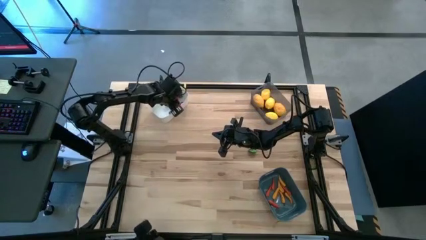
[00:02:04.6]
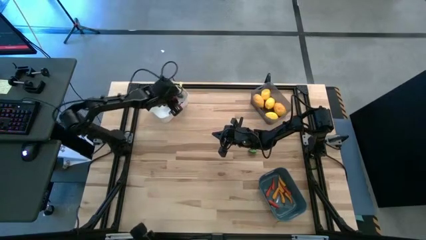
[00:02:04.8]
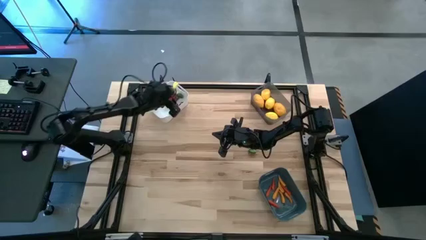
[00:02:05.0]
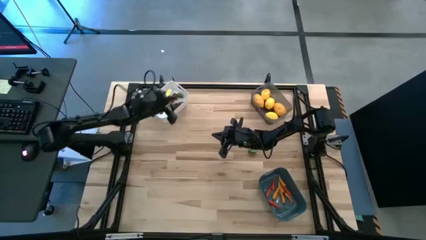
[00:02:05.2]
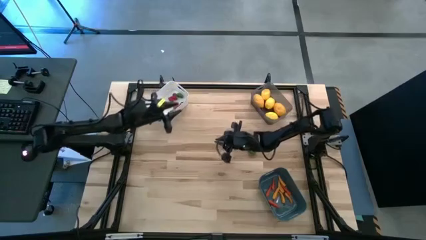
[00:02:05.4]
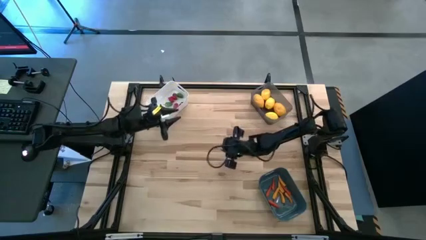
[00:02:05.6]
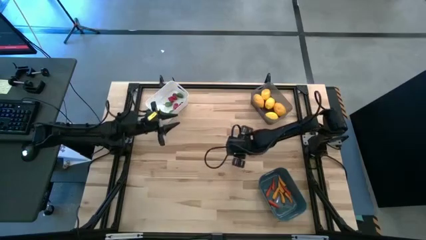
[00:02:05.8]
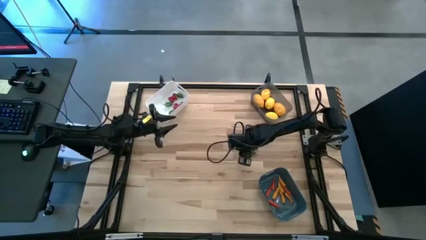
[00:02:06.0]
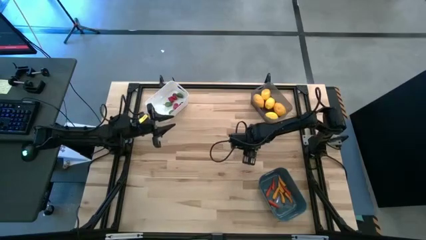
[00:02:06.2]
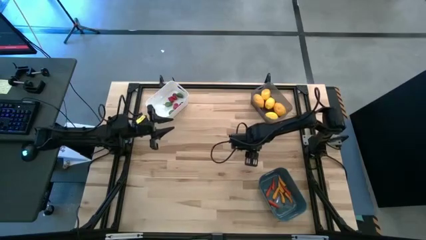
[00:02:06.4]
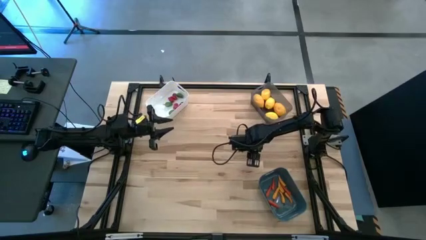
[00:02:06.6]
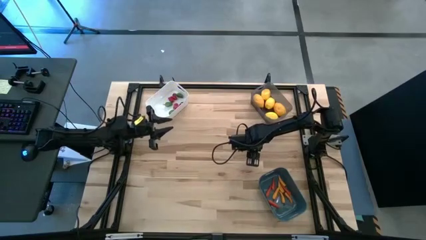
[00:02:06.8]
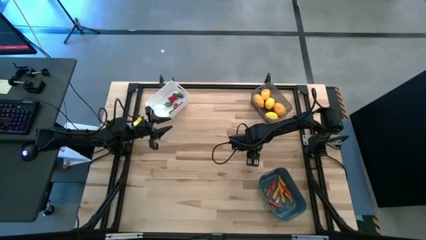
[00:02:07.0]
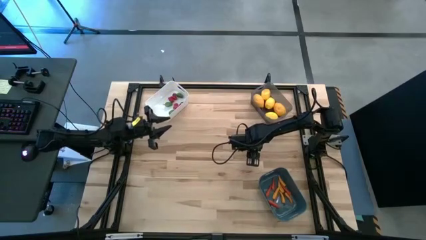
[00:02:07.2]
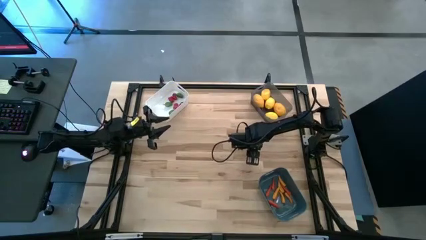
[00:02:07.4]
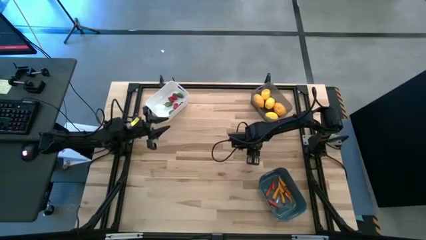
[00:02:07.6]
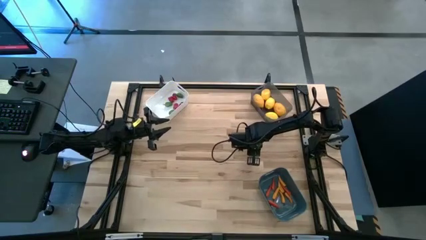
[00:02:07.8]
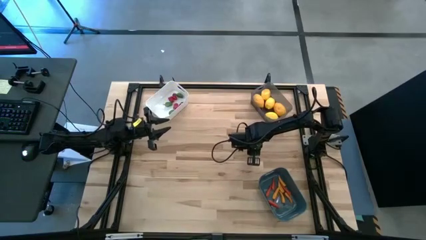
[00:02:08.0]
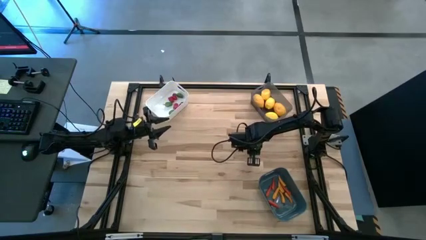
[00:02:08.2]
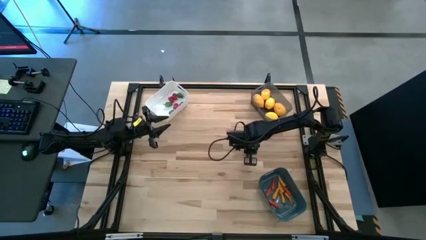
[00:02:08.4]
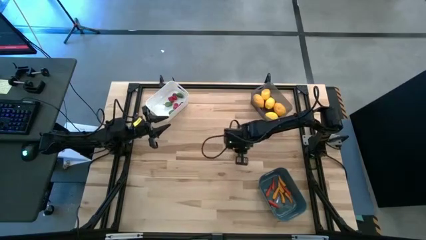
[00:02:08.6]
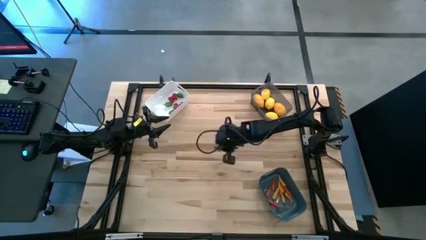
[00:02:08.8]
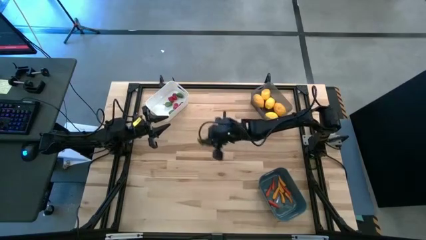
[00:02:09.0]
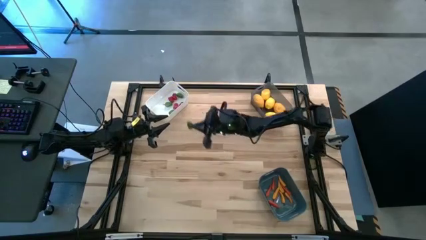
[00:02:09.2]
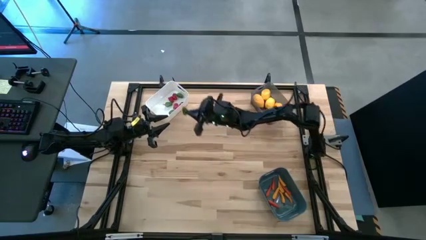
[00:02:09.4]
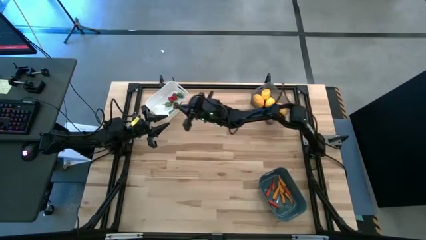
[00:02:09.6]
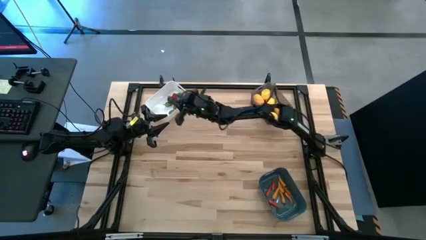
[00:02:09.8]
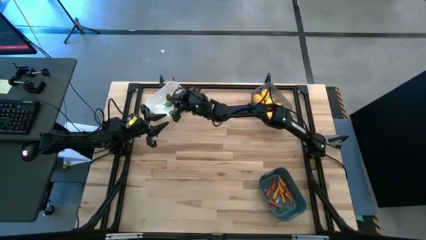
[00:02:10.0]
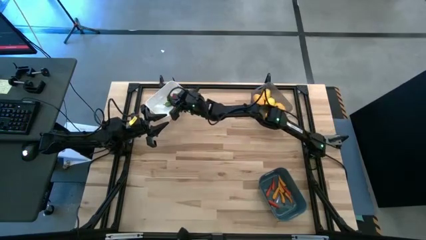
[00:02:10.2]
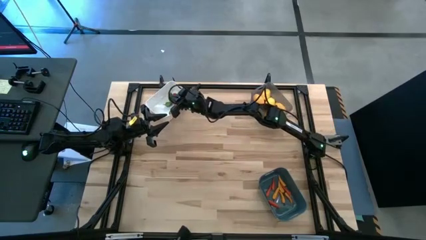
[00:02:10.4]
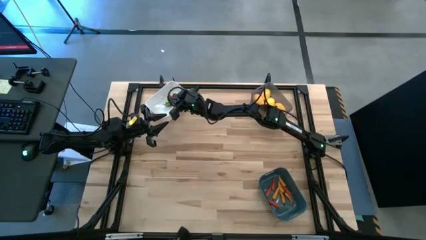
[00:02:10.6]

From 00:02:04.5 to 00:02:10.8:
Task: Sort produce into baskets
Put the green chili pepper into the white bin

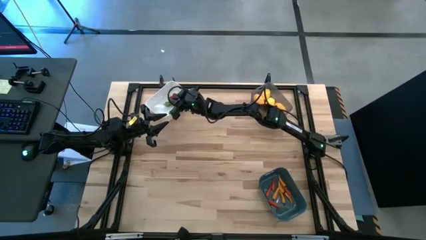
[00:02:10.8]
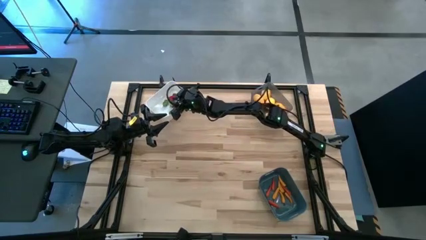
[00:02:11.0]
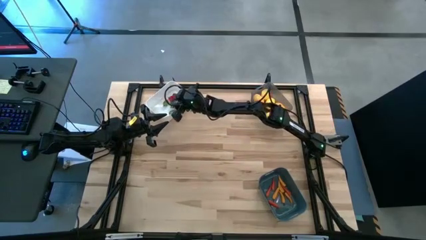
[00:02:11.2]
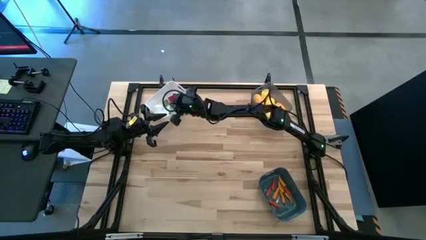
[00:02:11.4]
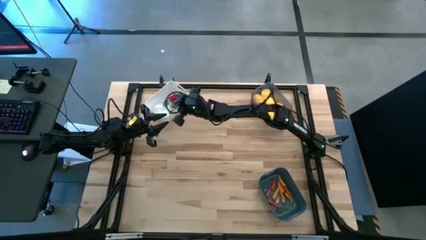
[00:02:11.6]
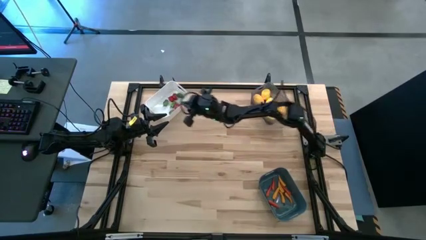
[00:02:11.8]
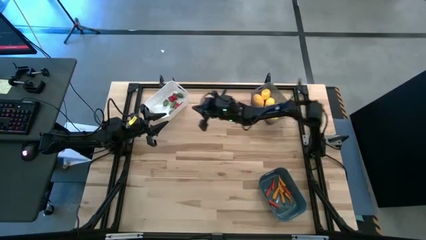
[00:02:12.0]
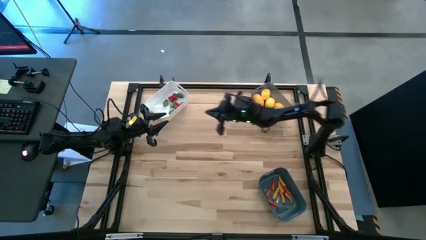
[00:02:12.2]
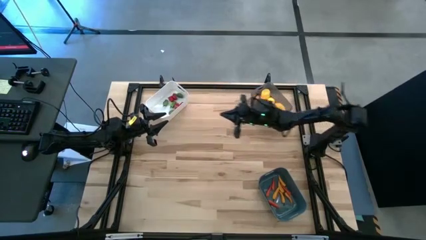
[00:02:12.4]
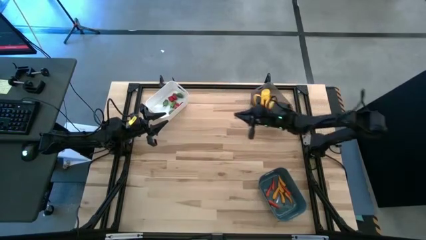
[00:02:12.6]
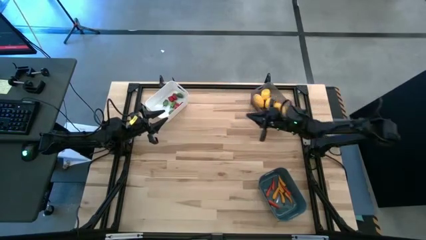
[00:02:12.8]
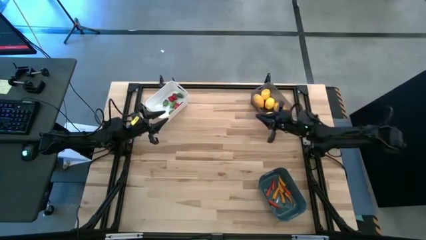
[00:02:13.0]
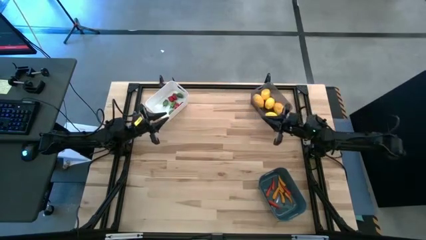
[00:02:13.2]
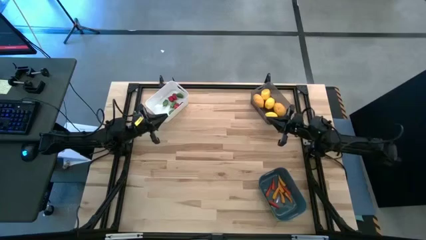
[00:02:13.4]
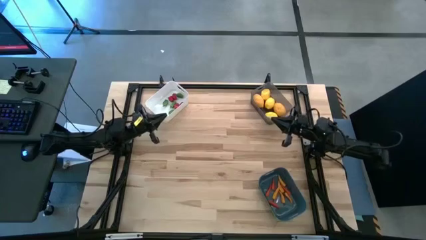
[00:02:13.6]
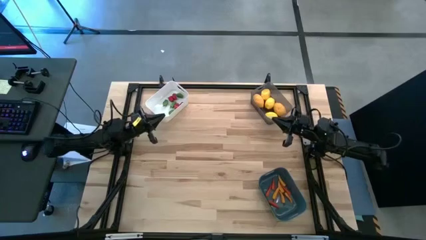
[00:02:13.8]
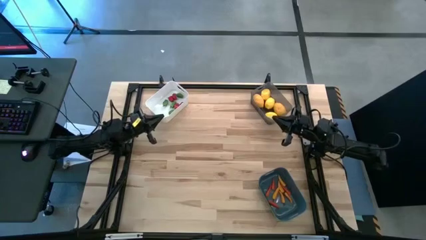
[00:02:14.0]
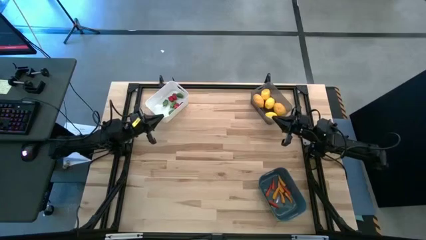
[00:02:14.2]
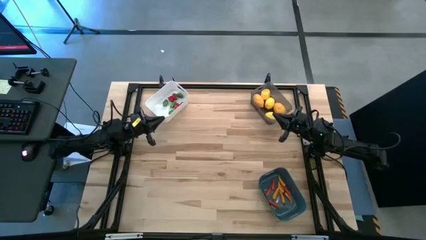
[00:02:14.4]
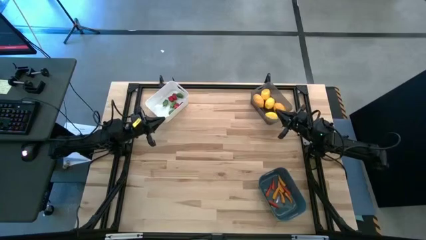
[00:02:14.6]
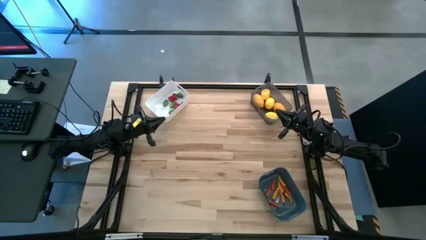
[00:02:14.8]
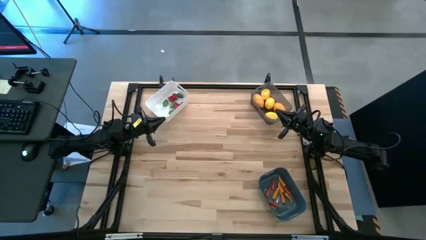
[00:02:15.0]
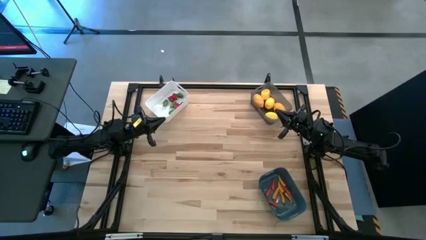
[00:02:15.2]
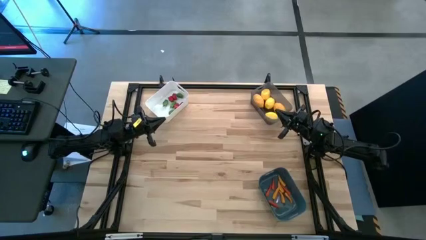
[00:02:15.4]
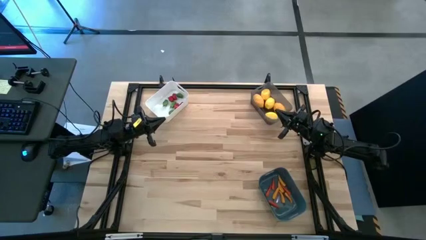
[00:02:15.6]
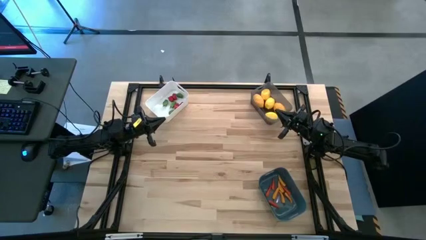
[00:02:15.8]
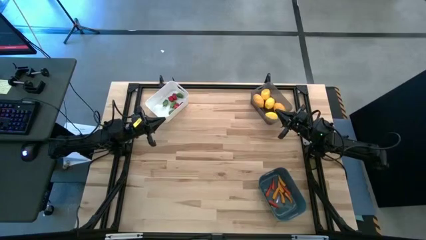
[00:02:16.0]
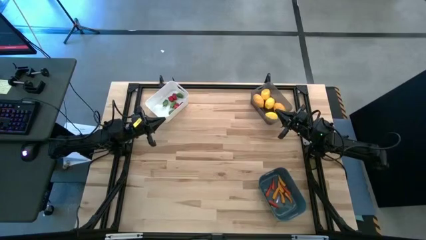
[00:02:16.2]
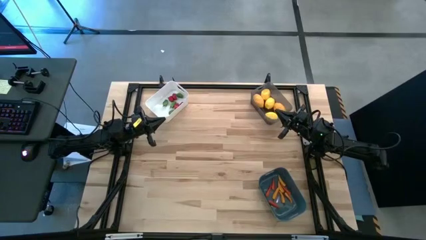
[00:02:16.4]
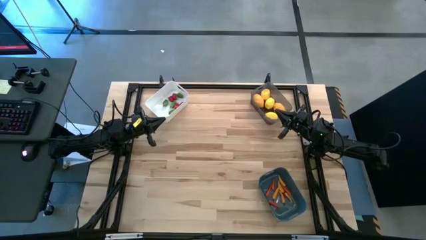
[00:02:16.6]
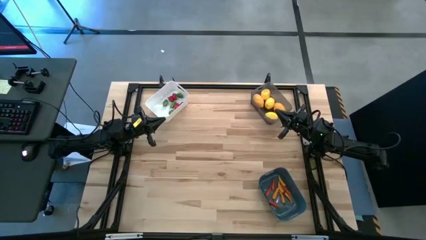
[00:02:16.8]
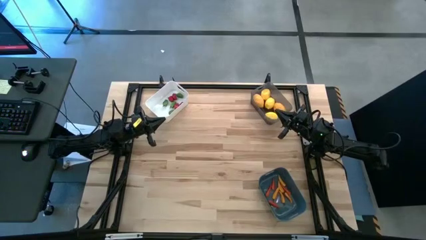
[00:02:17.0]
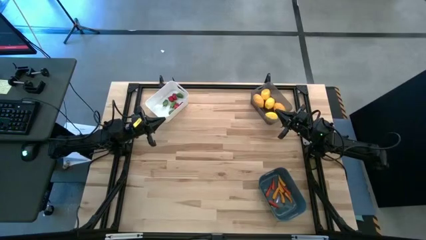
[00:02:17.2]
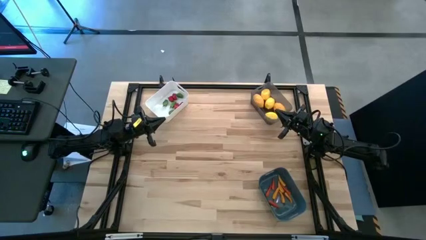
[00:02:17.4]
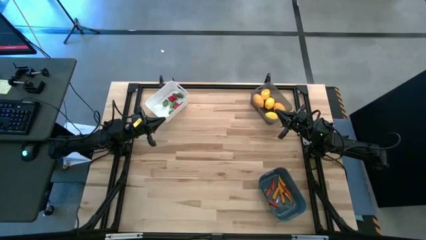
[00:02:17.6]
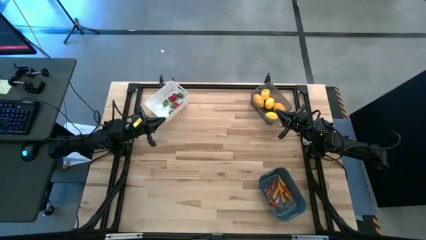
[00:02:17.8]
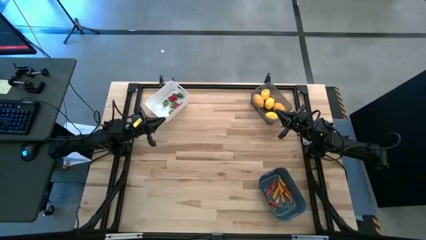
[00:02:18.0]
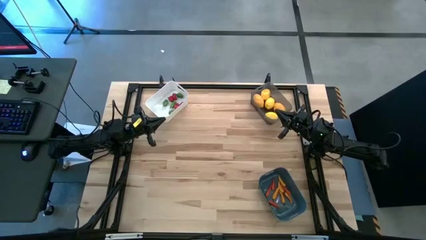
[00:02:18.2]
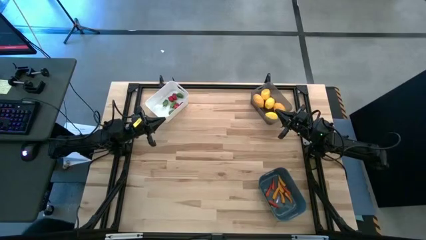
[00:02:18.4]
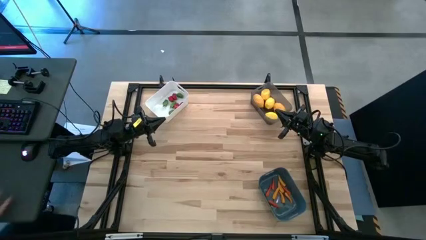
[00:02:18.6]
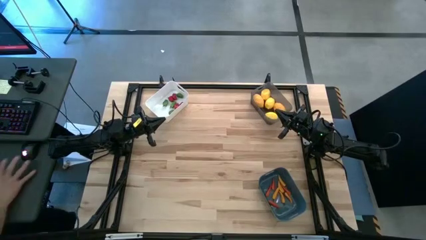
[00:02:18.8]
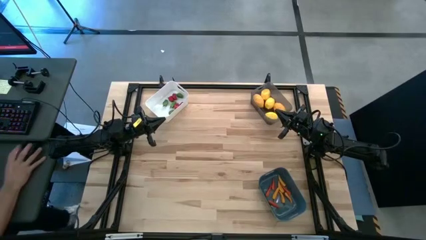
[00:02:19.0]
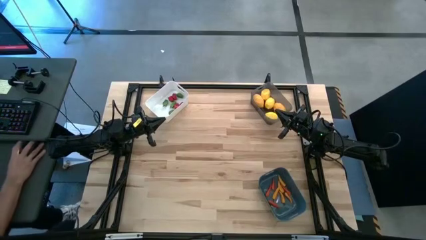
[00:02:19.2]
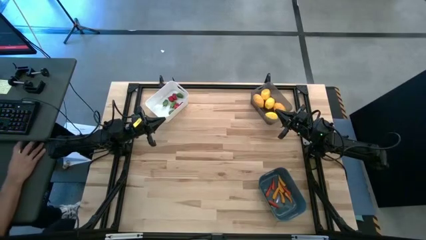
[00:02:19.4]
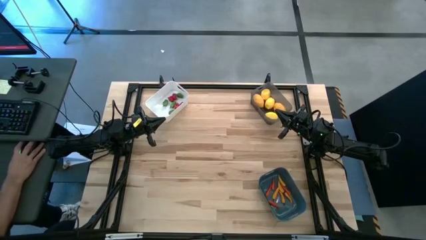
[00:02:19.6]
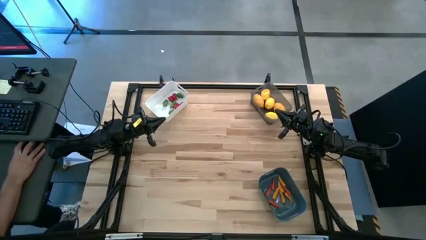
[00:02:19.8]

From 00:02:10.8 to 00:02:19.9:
Return to Home Position

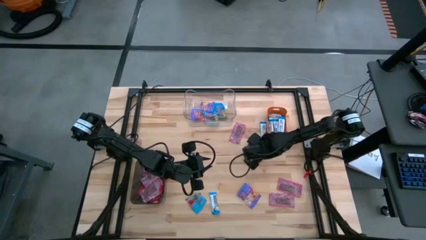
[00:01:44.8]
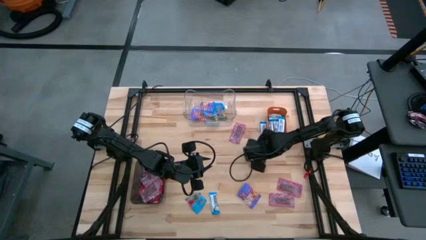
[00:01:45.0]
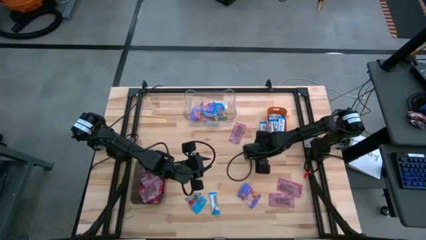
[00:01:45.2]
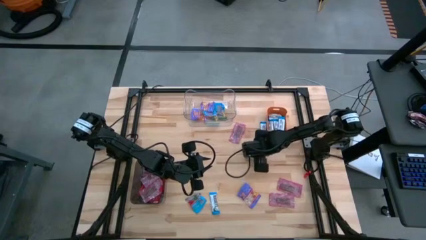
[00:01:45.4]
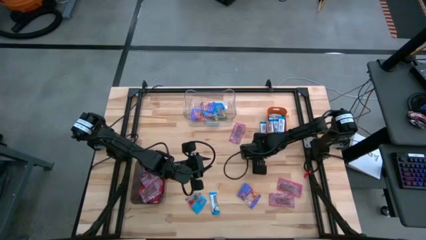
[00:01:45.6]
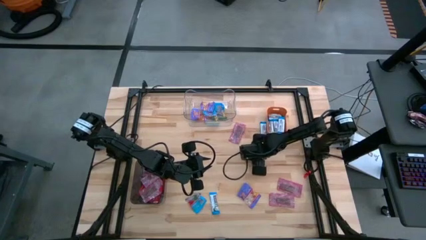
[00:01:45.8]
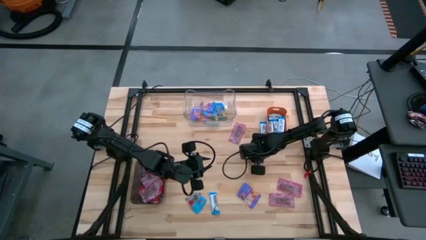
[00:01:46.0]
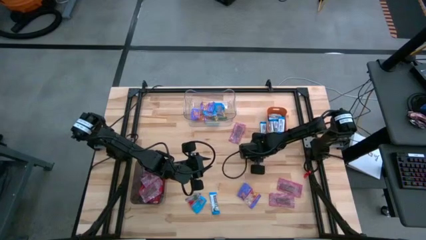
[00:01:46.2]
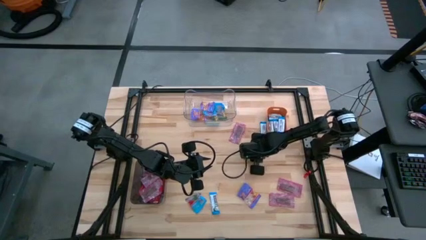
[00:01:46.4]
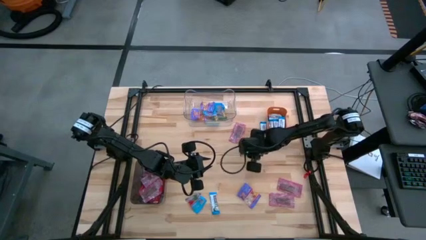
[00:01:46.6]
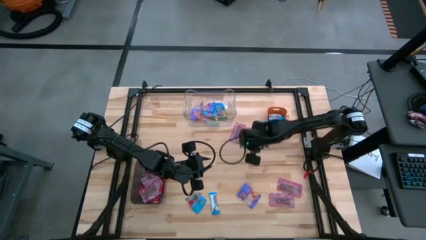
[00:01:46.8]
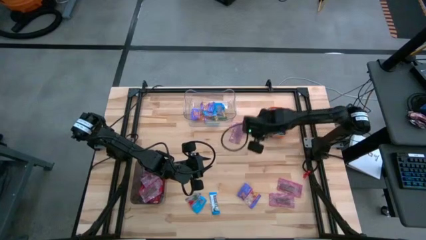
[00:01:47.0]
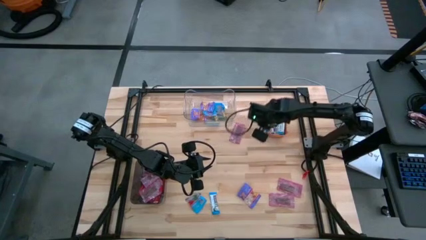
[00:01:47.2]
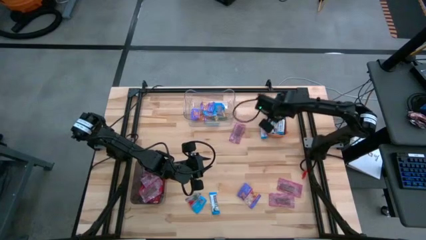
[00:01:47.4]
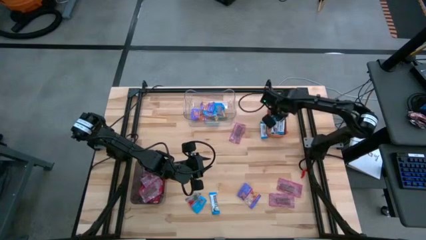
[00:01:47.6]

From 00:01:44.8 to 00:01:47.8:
Task: Sort candy
Put the white chocolate into the orange bin
